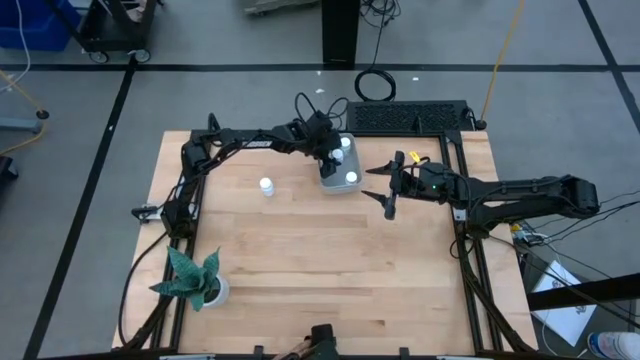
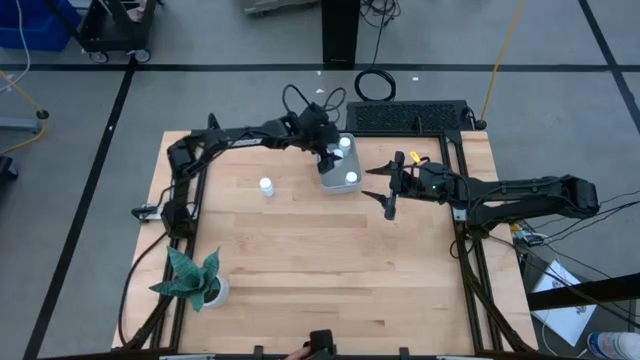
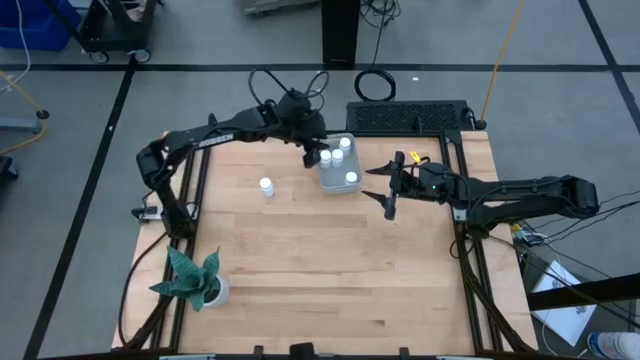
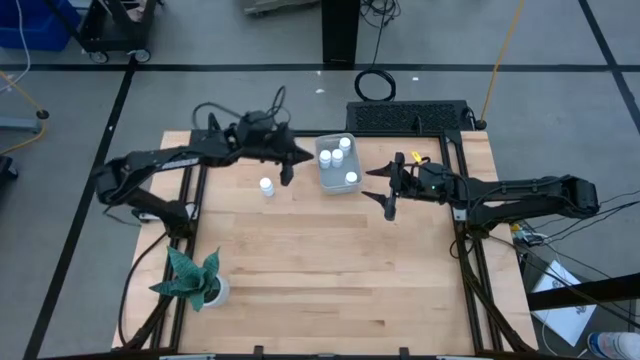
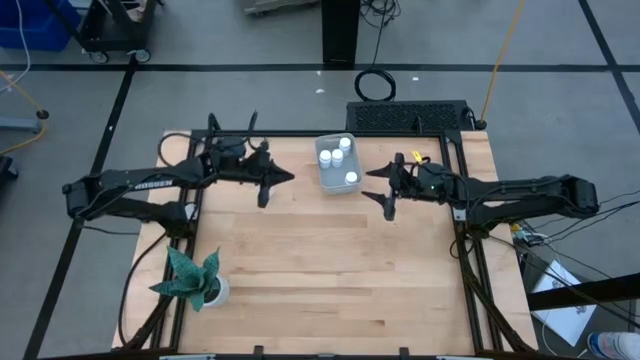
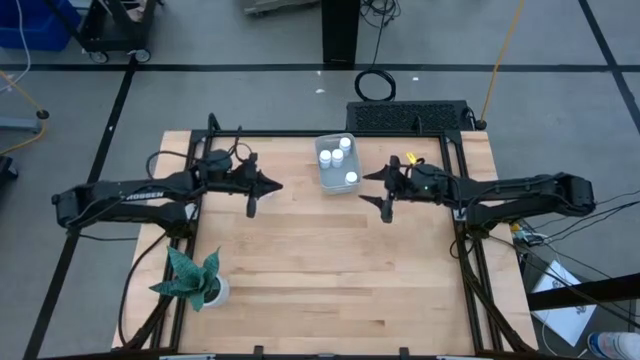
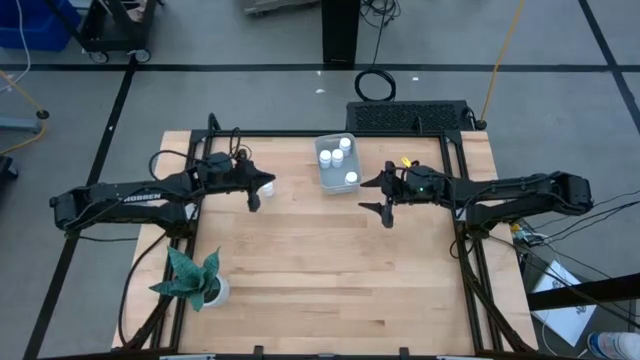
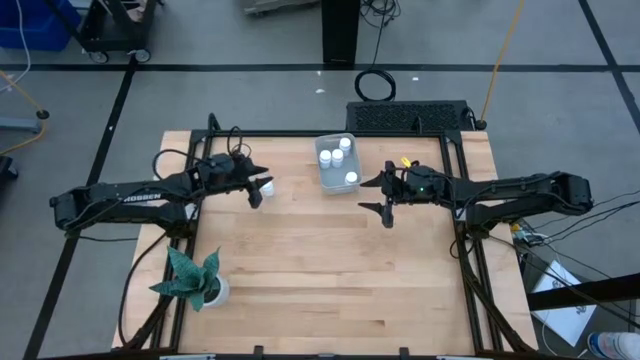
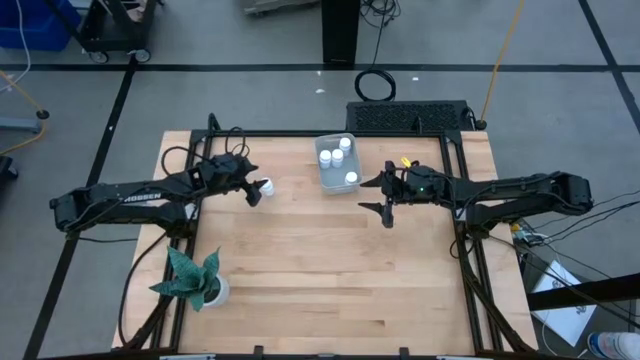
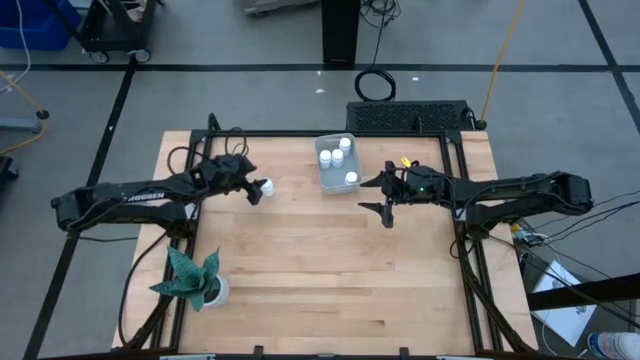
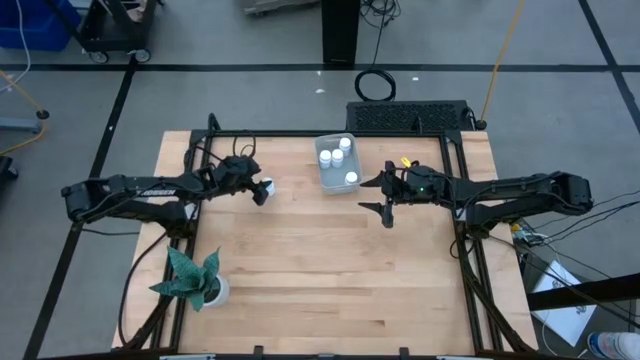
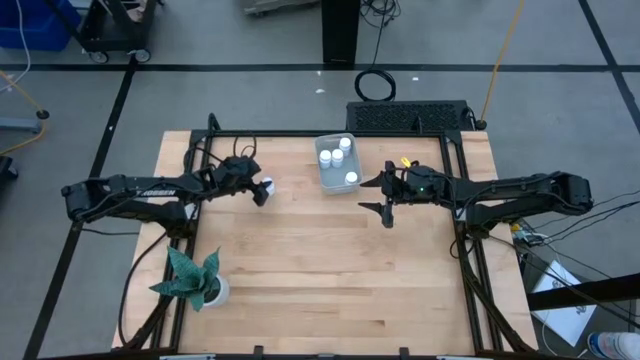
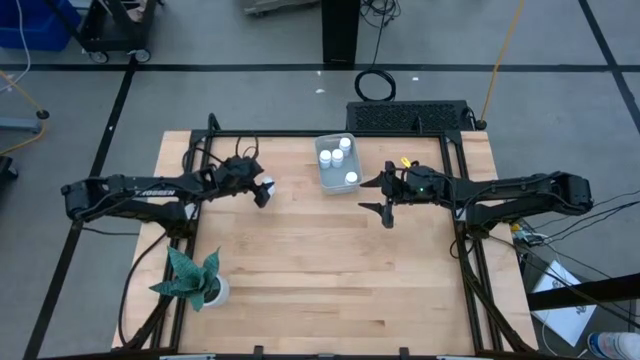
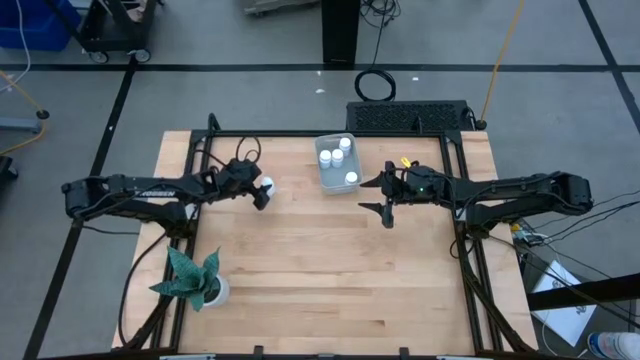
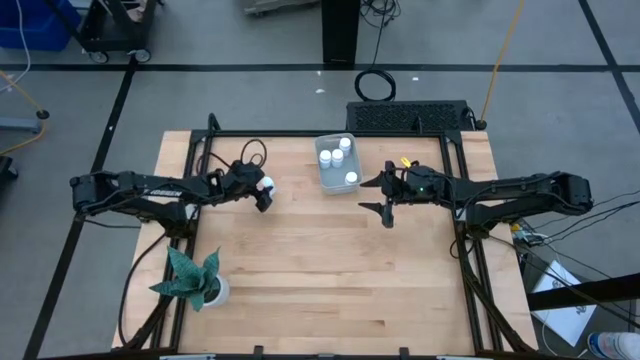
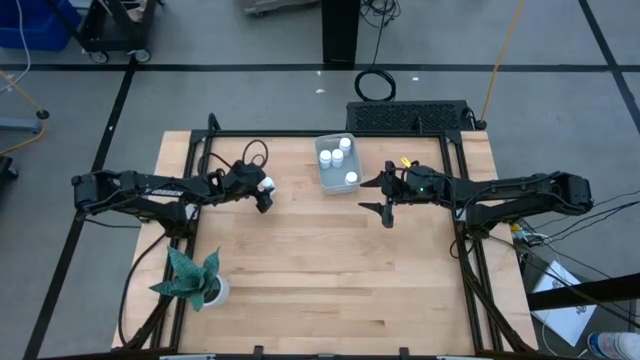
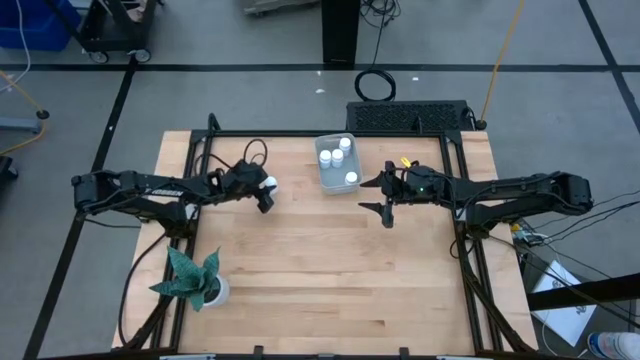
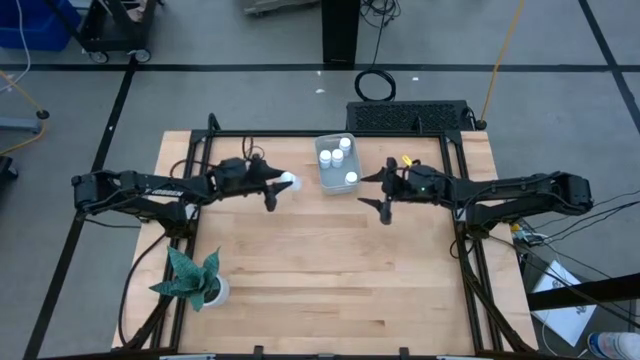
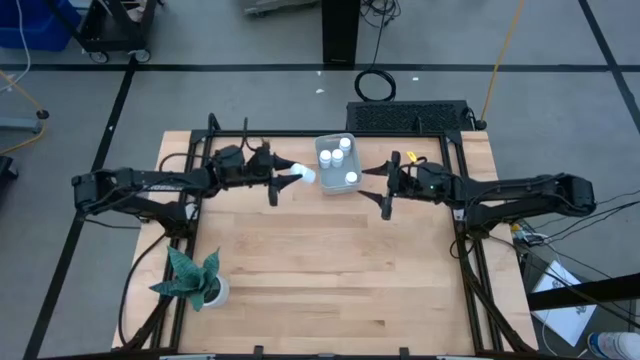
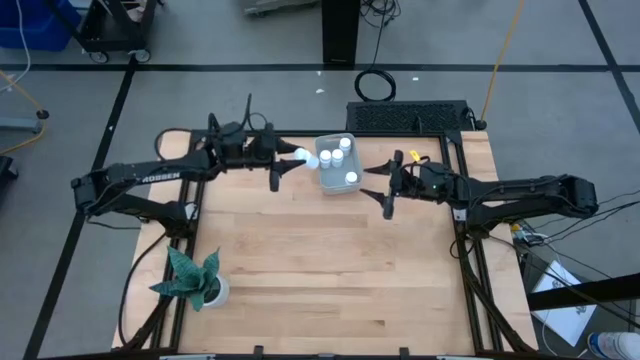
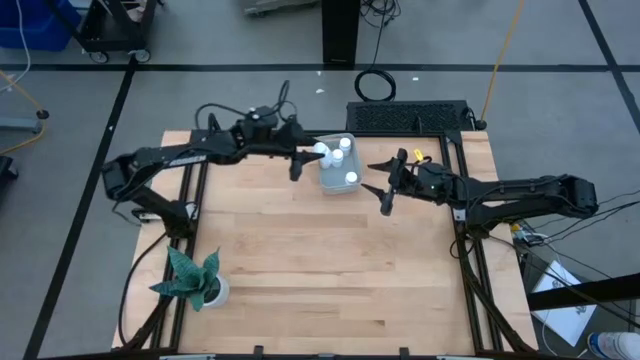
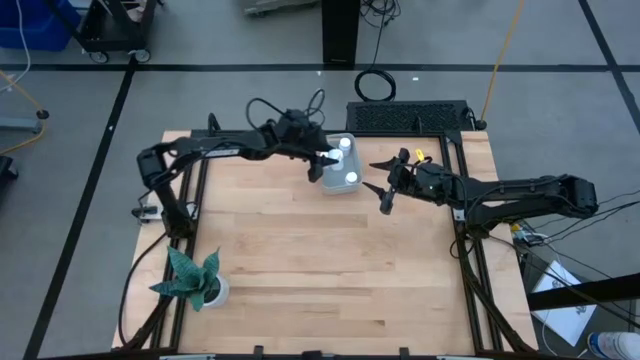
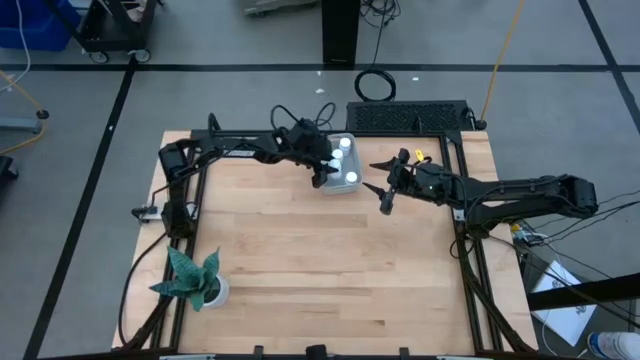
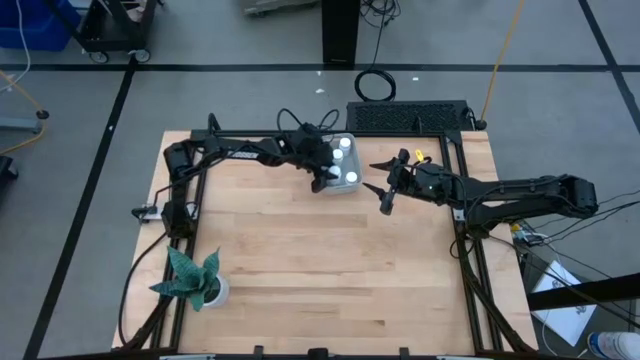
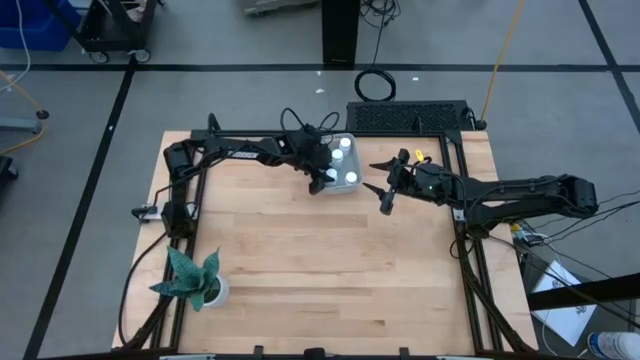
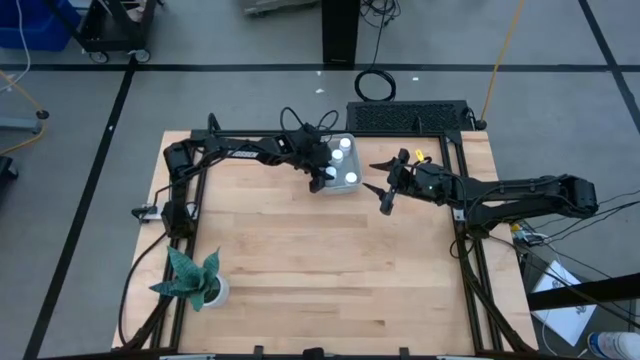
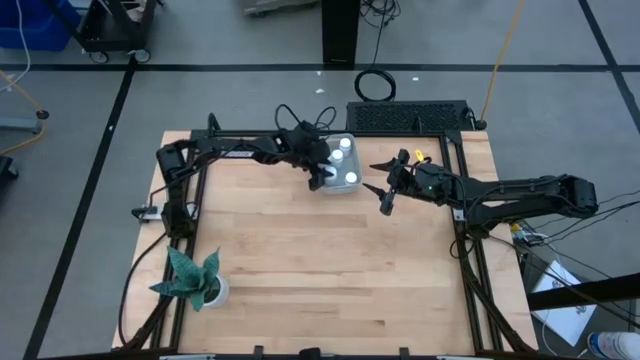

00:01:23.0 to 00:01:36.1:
Task: Pick and place pill bottles into a basket
Put the white medicine bottle into the gray bin

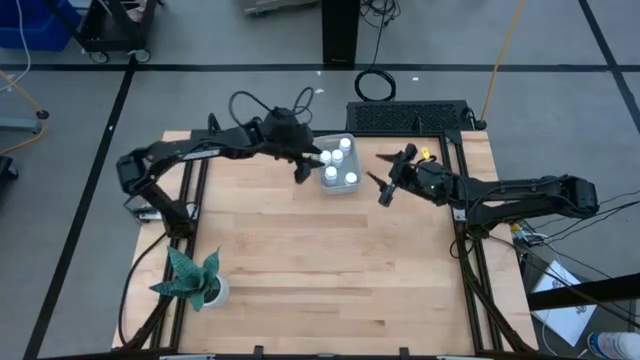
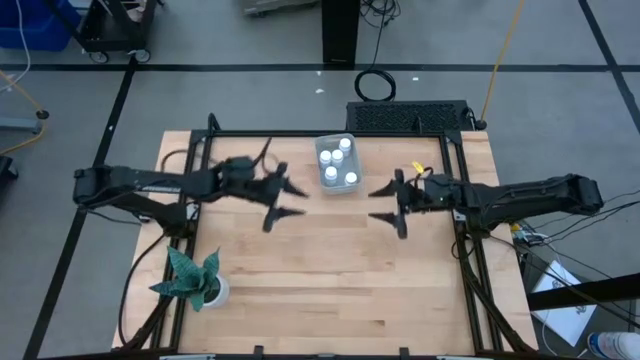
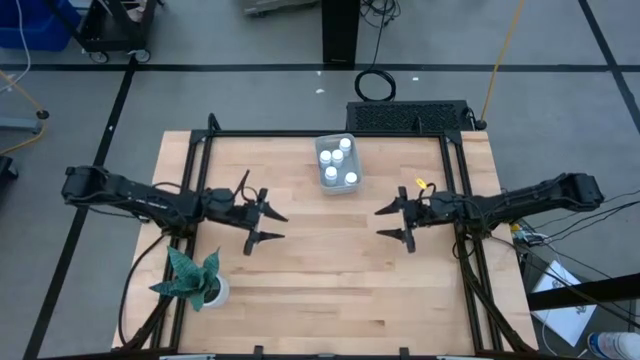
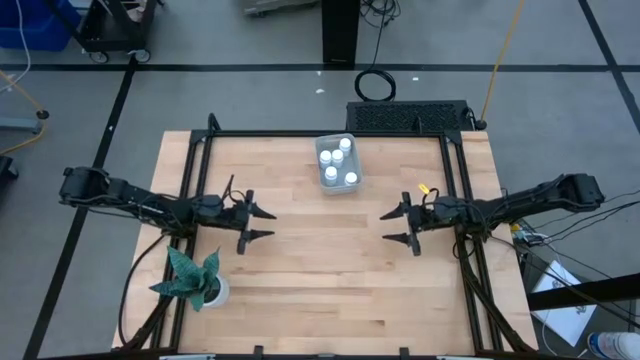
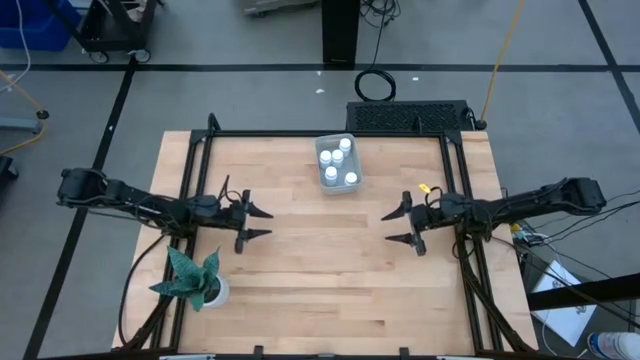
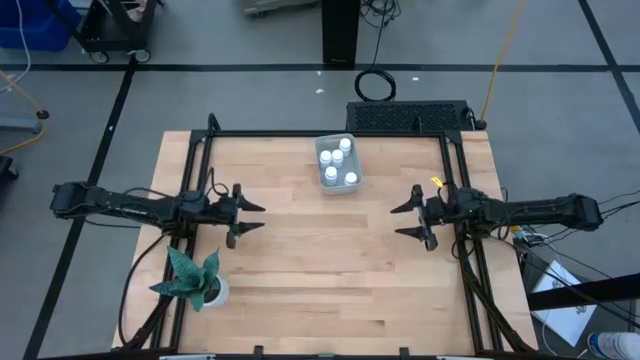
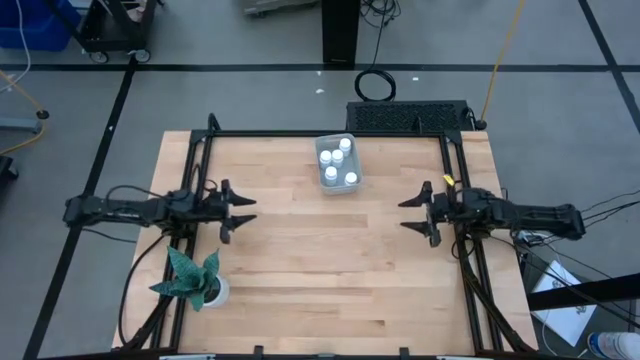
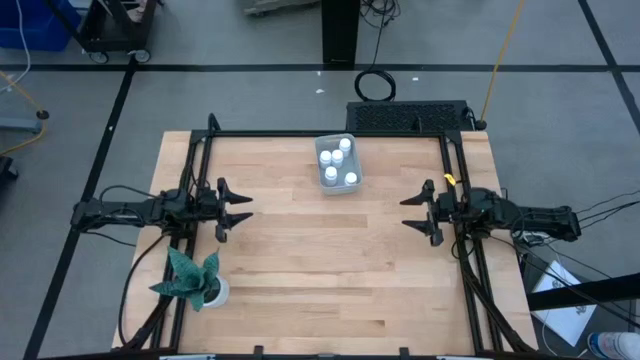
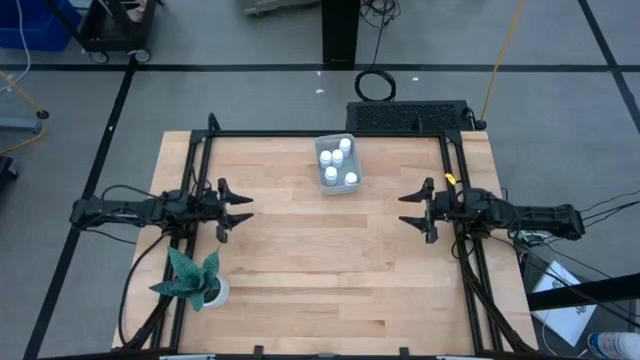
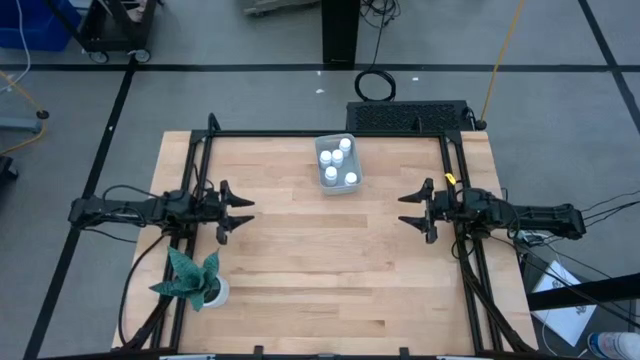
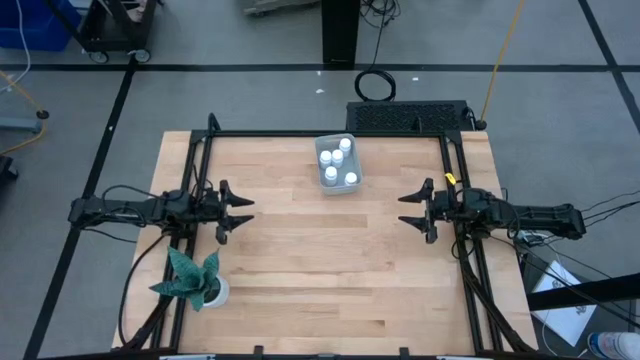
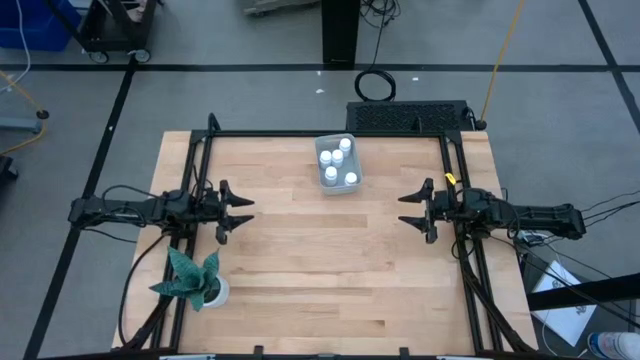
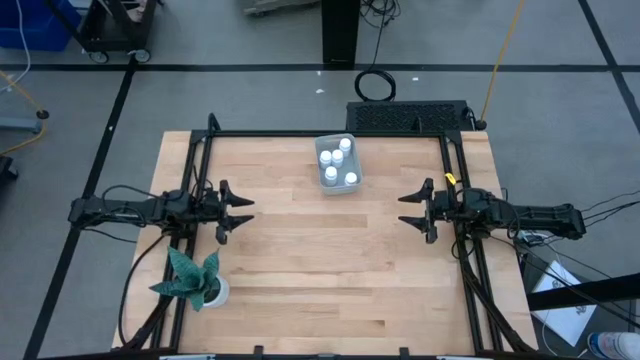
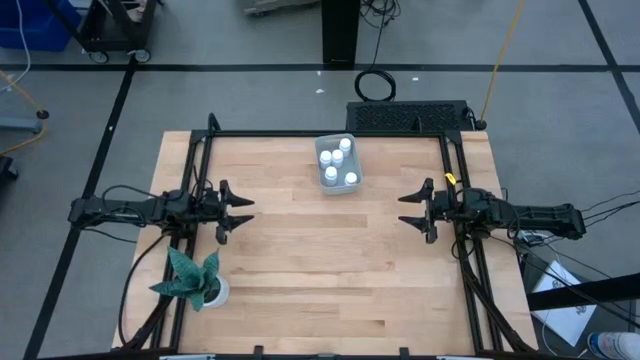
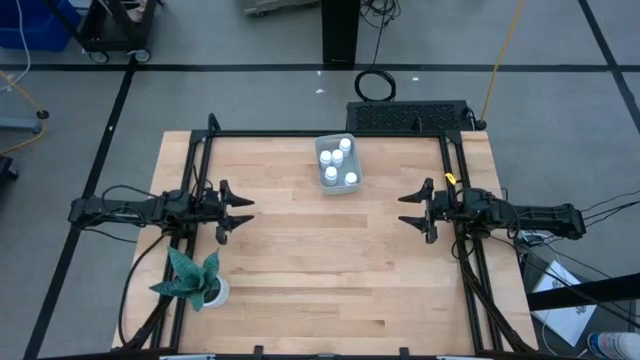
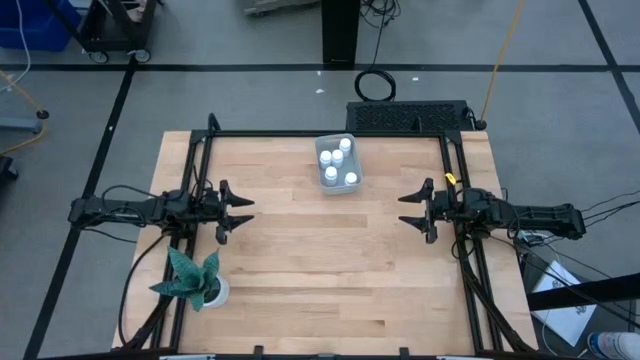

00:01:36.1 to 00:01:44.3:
Return to Home Position
